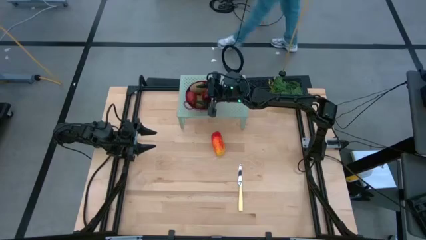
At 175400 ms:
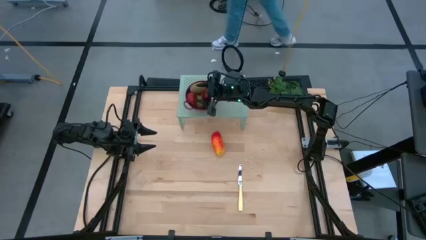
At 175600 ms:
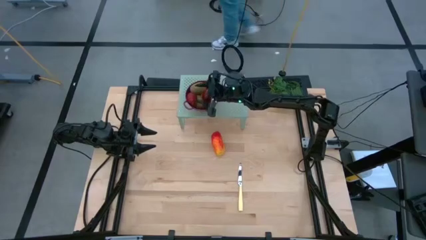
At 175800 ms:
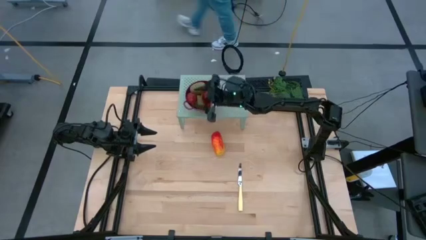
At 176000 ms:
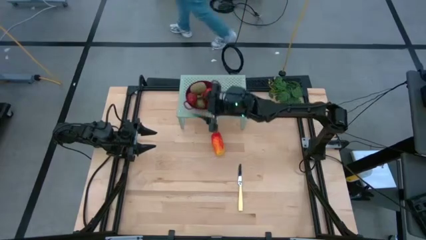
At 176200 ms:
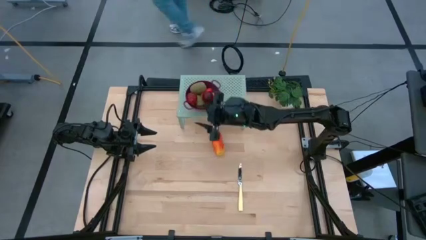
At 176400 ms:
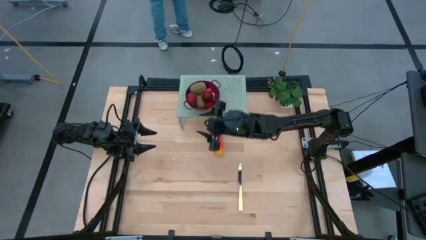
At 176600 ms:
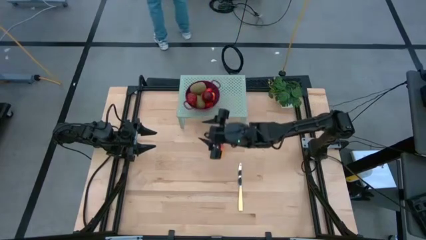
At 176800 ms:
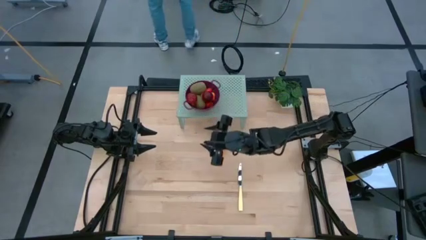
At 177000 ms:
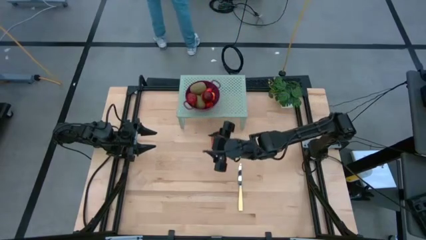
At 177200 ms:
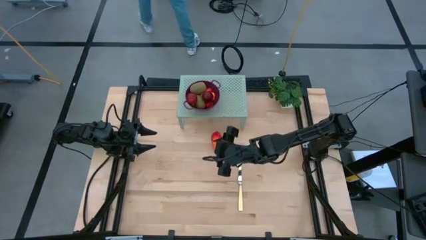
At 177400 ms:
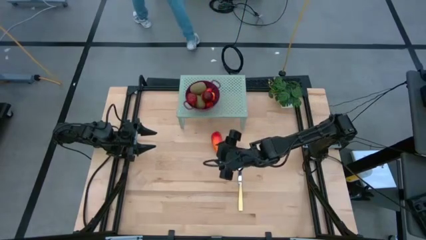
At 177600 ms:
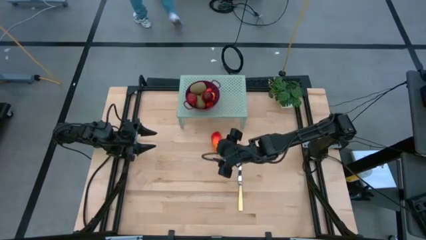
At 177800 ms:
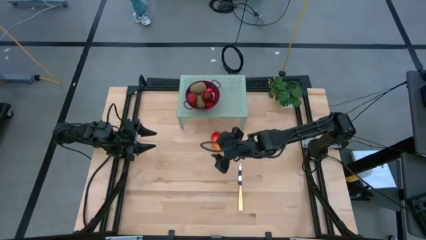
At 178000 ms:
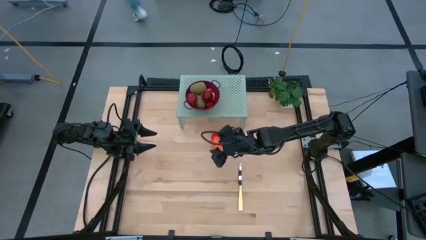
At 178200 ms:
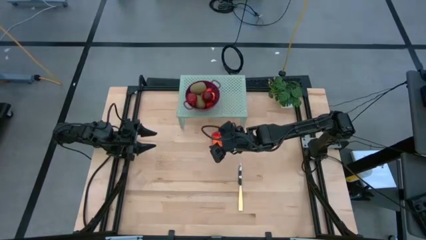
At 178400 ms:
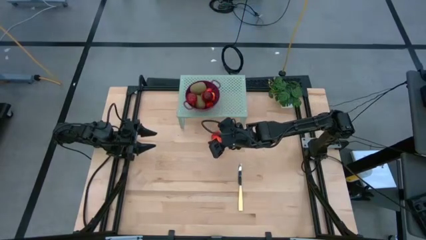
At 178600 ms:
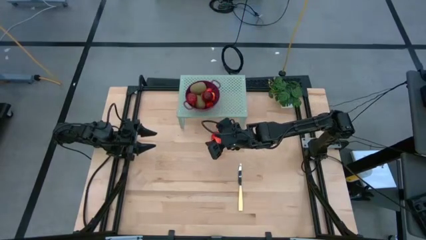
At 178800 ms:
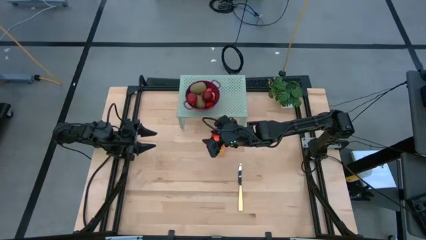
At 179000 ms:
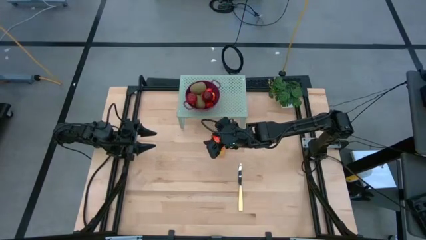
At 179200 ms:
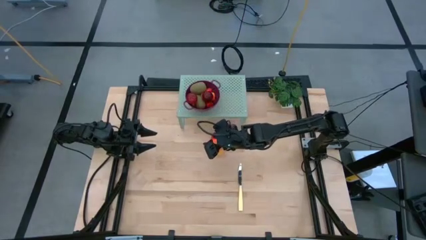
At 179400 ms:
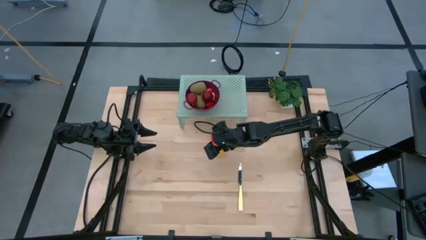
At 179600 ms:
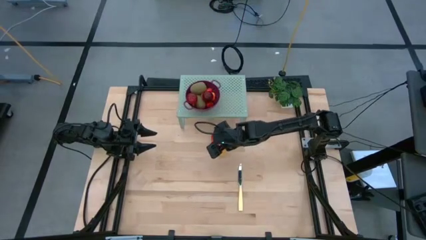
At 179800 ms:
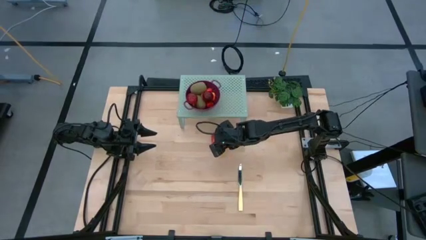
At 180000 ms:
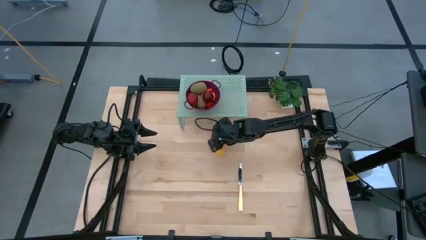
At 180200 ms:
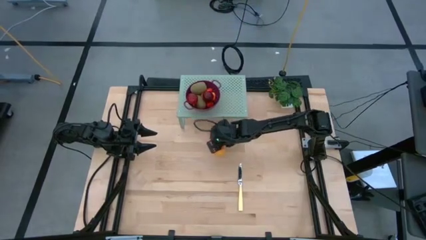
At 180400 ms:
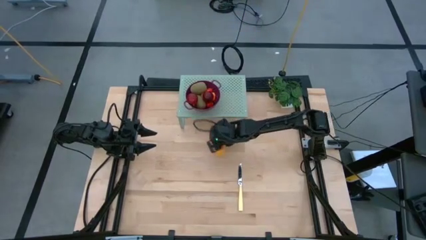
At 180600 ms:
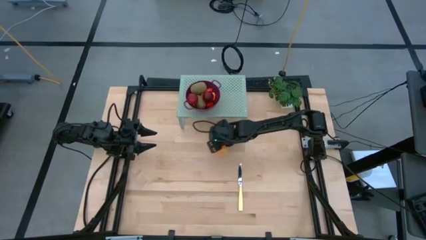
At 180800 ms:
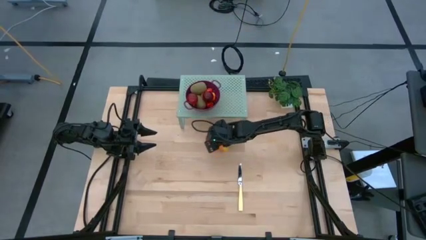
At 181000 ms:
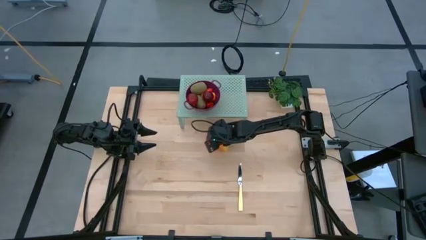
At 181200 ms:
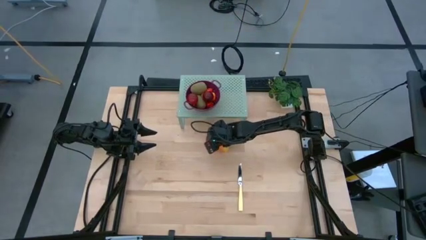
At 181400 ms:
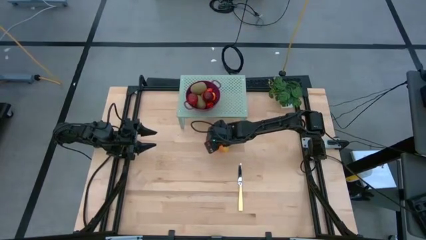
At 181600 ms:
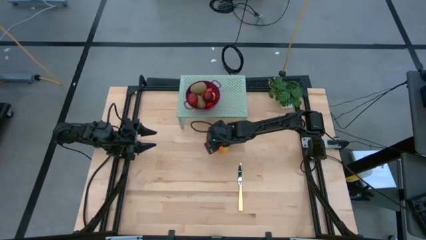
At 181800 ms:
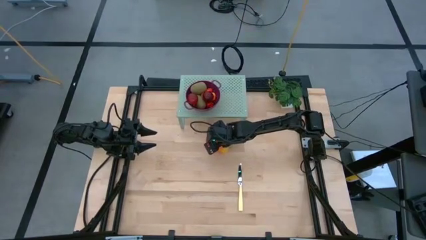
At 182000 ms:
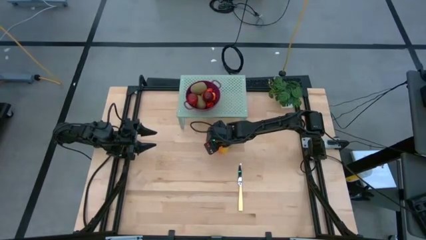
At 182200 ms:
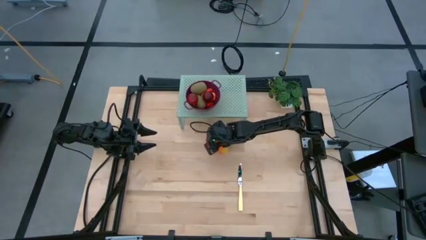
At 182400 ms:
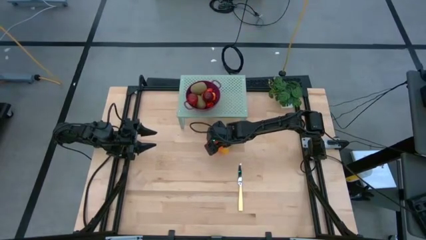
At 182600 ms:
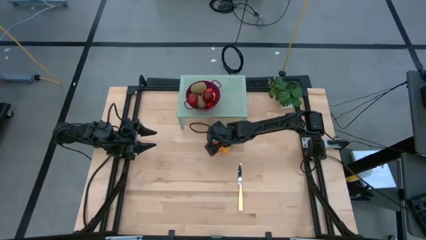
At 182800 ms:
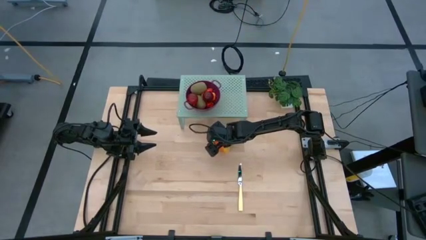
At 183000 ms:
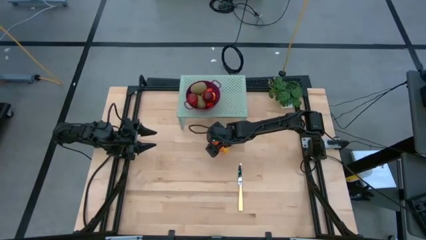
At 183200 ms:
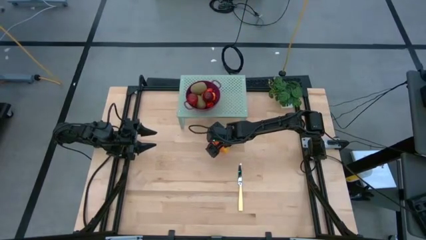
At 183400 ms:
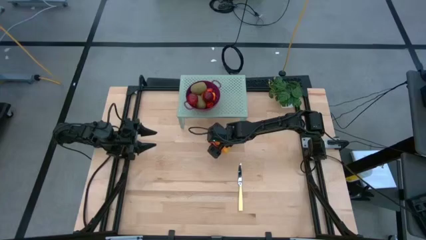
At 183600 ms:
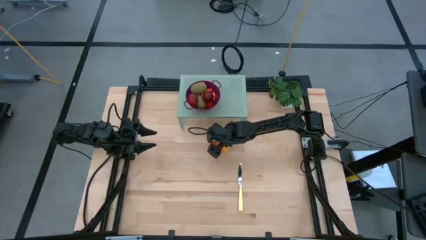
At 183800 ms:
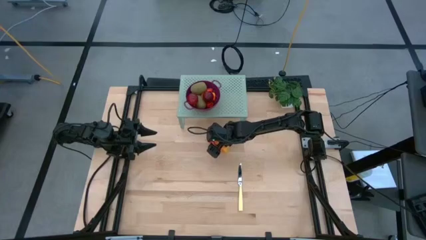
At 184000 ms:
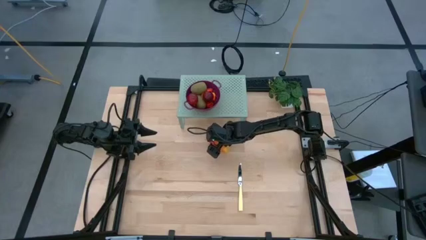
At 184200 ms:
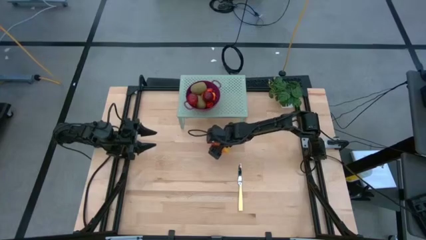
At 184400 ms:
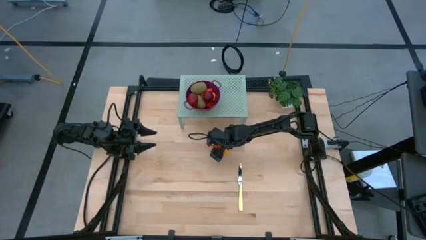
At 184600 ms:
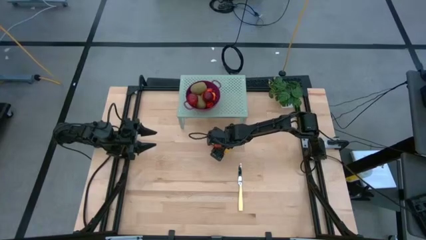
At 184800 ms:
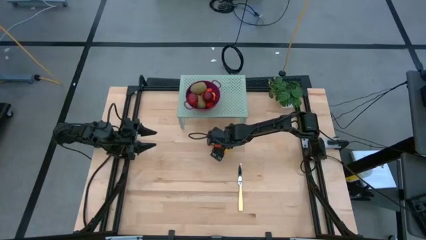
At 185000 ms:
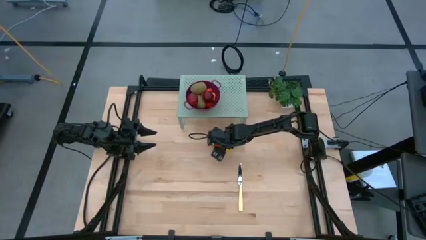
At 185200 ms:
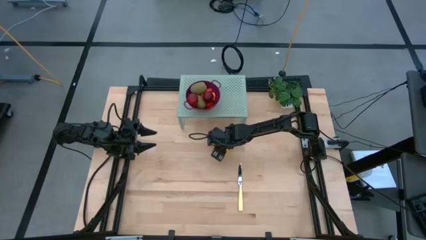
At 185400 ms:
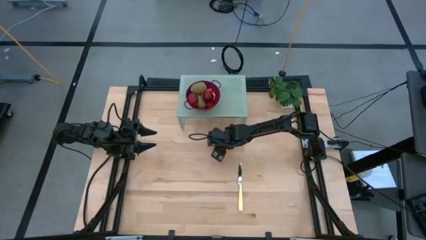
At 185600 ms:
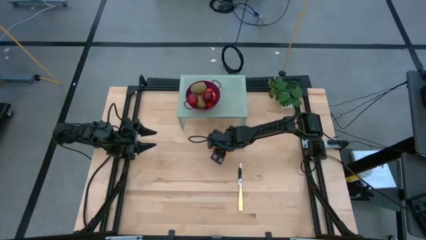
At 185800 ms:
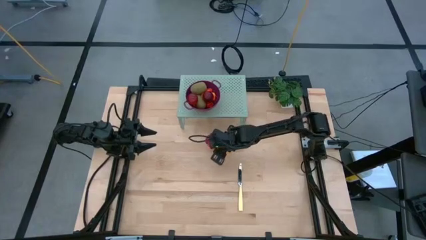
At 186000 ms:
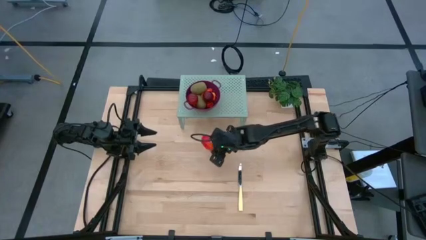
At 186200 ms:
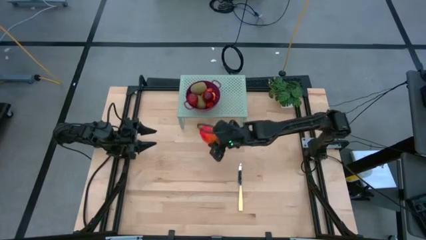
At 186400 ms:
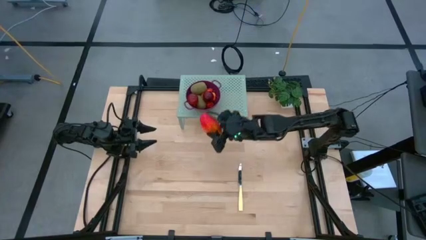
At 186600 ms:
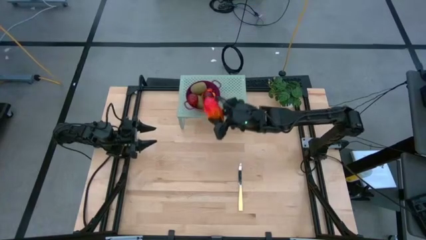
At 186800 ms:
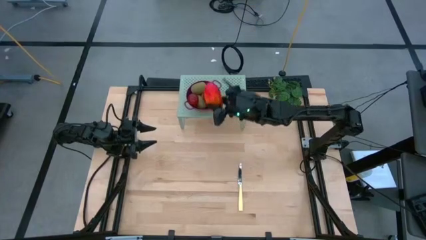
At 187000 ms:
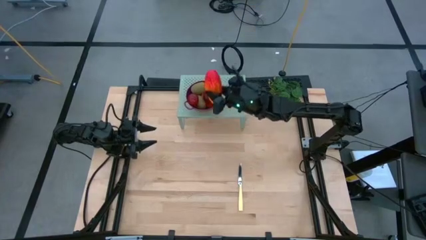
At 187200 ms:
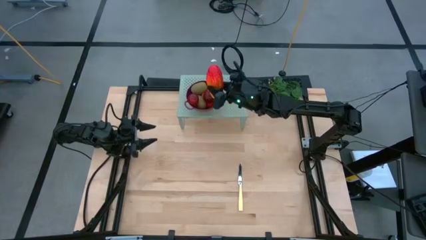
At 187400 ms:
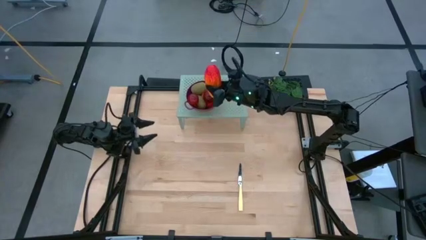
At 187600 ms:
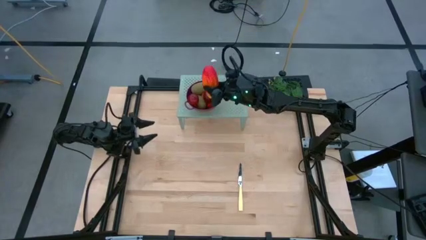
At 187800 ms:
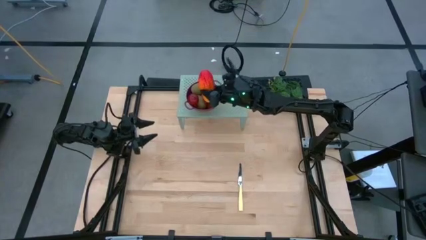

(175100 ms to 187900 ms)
Task: Pick & Place Fruit
Put the mango into violet strainer bowl on the shelf
